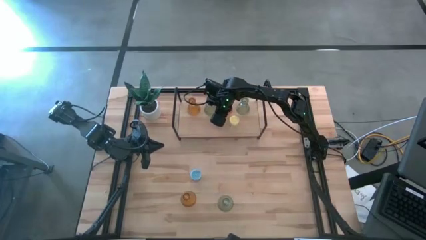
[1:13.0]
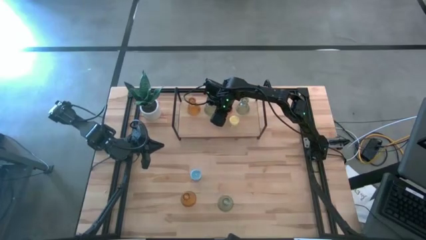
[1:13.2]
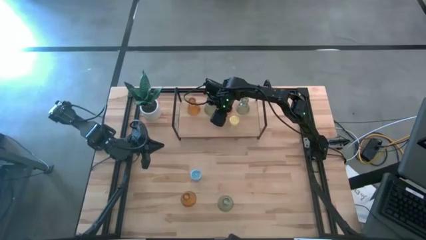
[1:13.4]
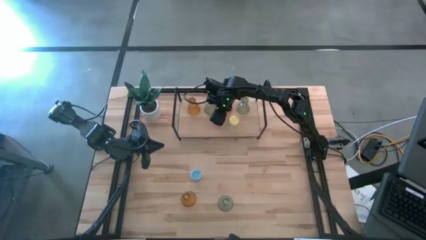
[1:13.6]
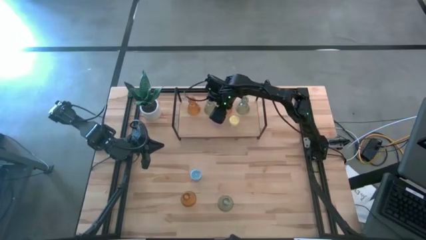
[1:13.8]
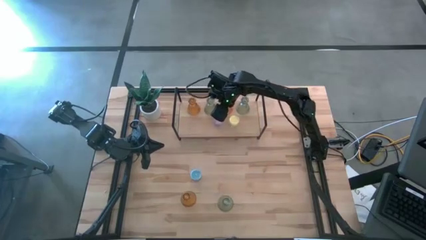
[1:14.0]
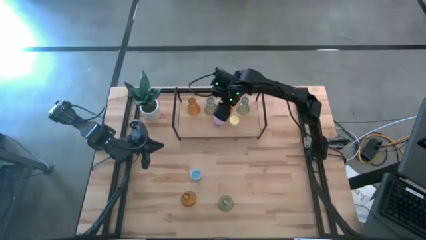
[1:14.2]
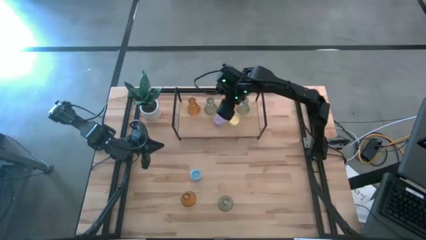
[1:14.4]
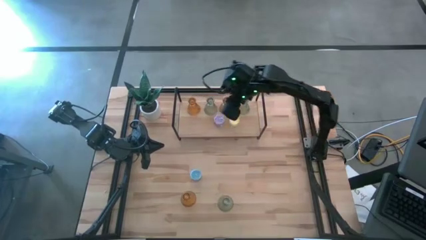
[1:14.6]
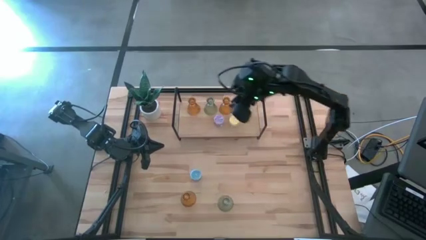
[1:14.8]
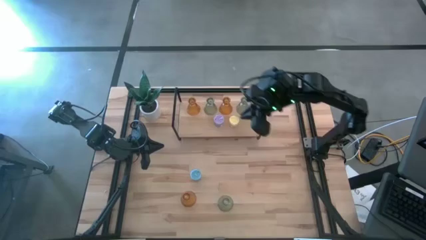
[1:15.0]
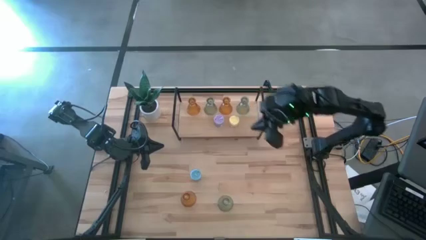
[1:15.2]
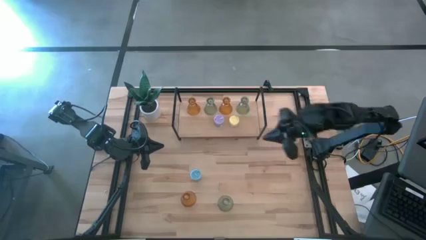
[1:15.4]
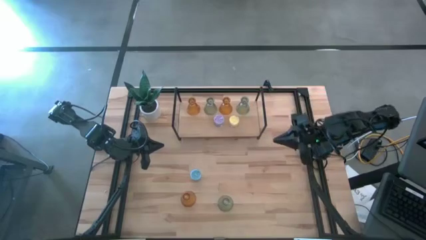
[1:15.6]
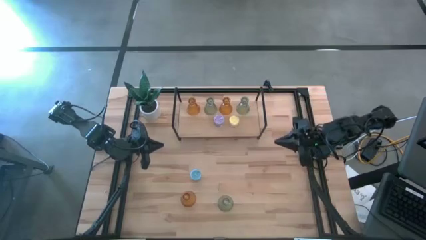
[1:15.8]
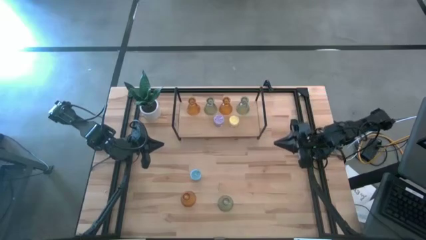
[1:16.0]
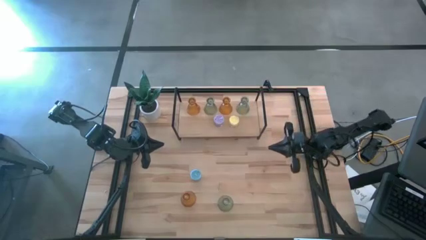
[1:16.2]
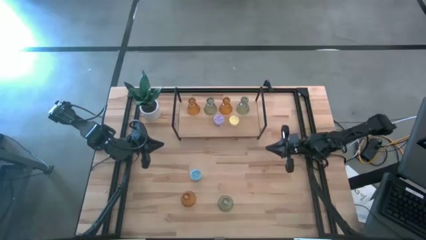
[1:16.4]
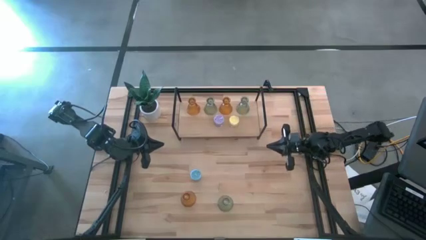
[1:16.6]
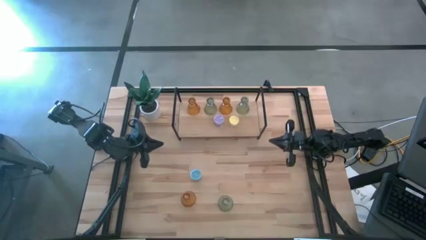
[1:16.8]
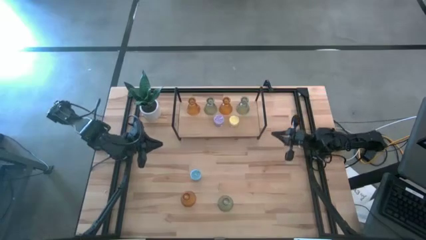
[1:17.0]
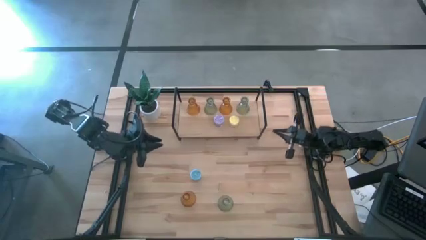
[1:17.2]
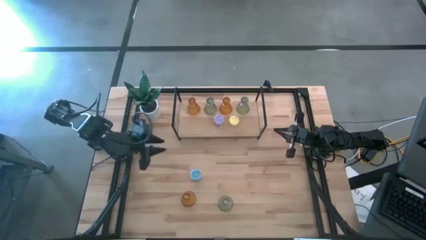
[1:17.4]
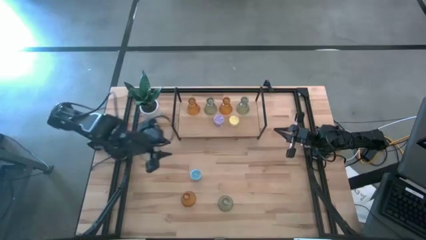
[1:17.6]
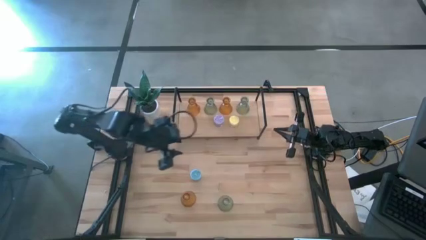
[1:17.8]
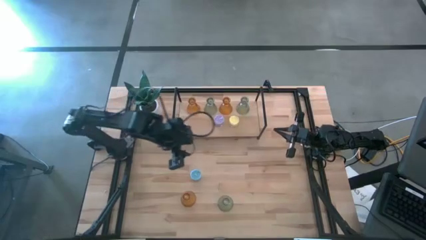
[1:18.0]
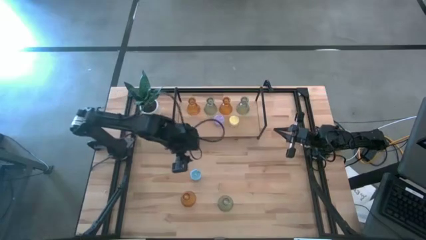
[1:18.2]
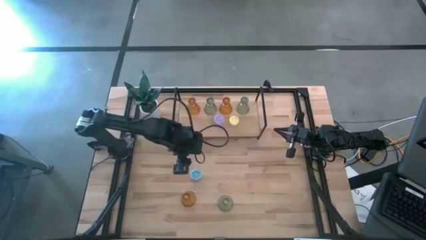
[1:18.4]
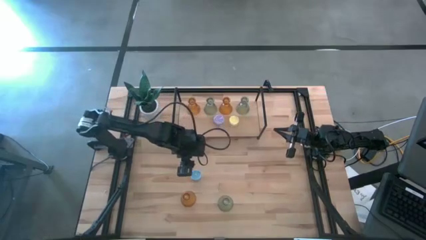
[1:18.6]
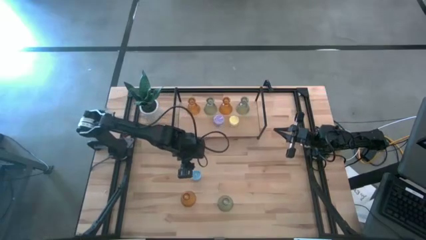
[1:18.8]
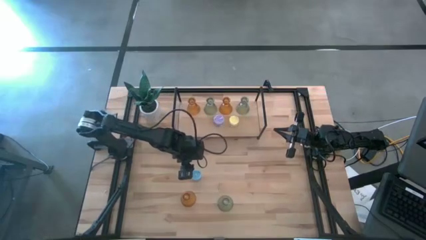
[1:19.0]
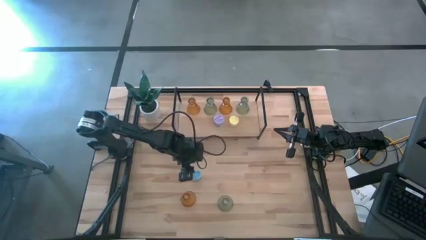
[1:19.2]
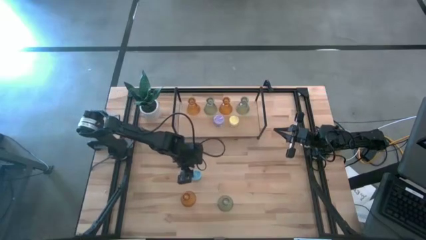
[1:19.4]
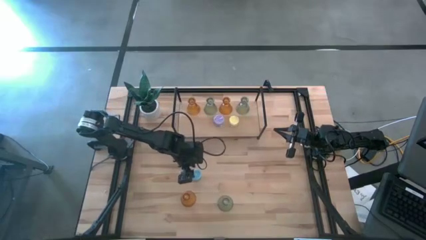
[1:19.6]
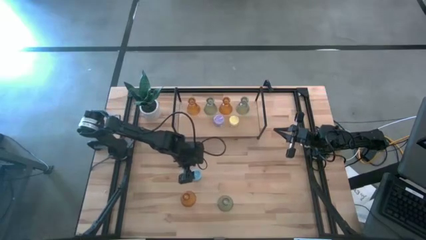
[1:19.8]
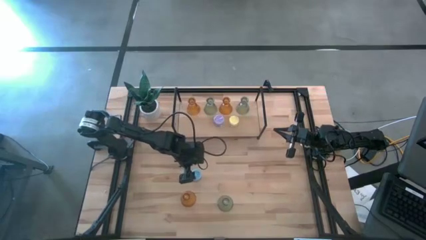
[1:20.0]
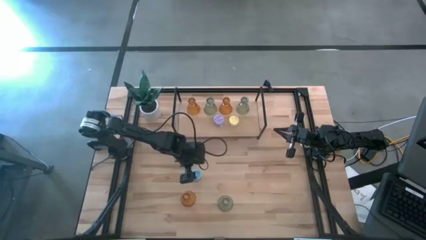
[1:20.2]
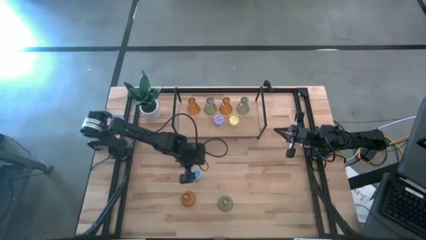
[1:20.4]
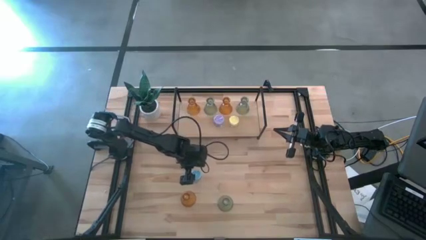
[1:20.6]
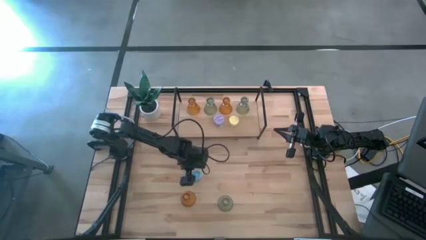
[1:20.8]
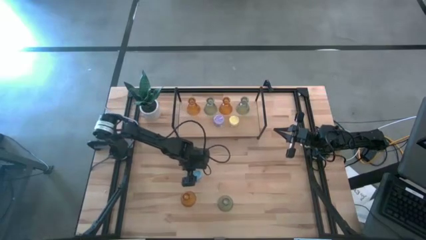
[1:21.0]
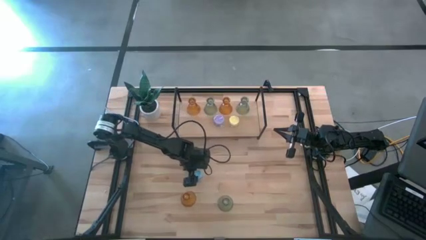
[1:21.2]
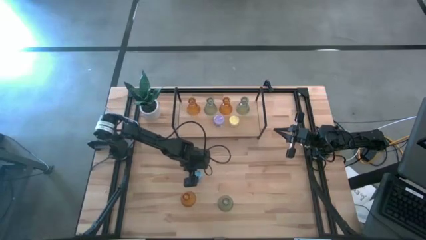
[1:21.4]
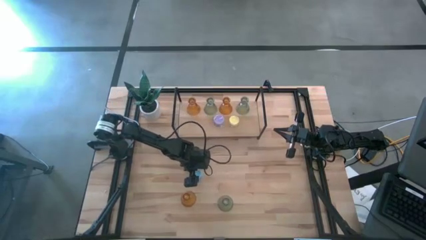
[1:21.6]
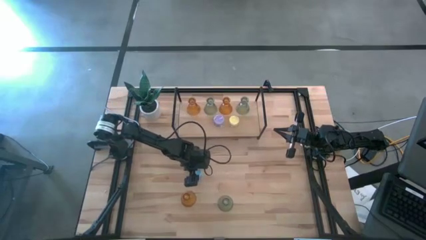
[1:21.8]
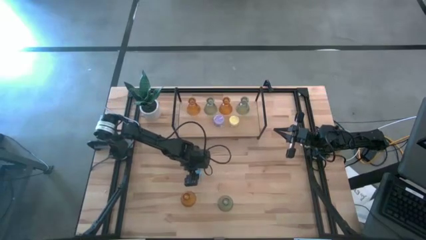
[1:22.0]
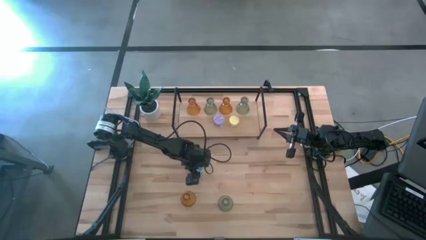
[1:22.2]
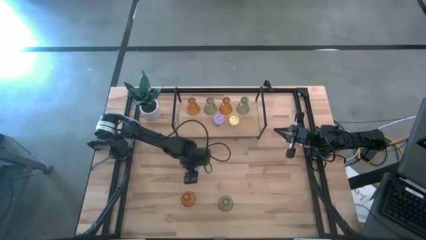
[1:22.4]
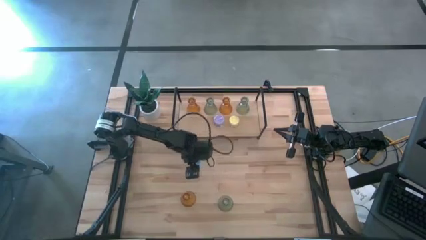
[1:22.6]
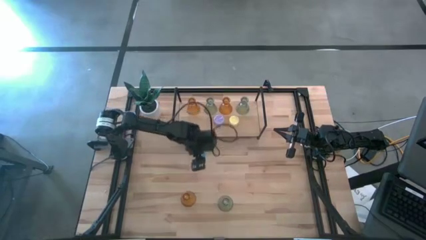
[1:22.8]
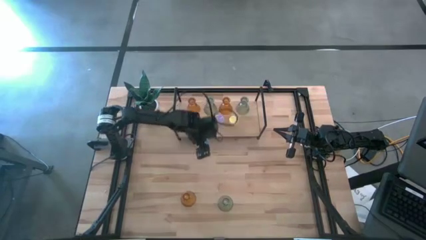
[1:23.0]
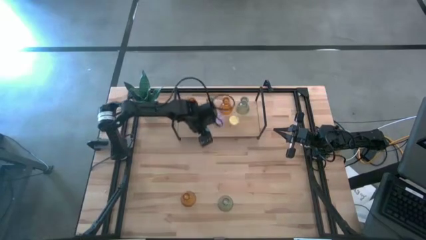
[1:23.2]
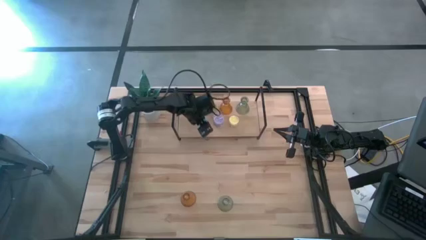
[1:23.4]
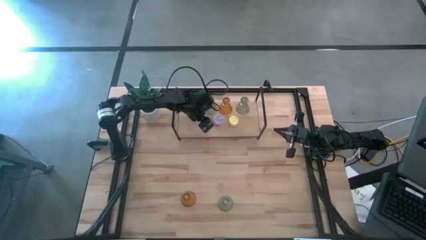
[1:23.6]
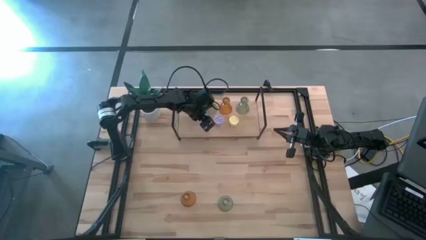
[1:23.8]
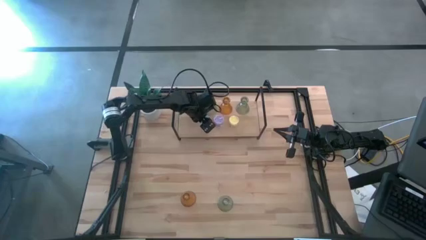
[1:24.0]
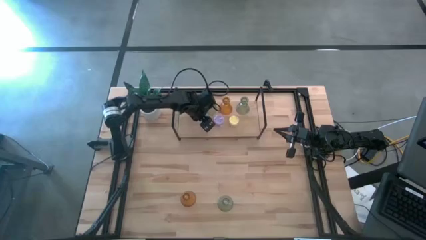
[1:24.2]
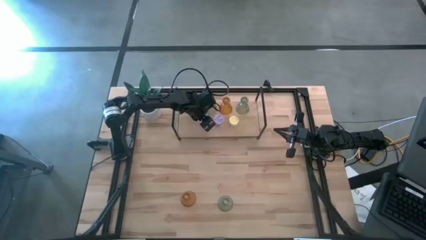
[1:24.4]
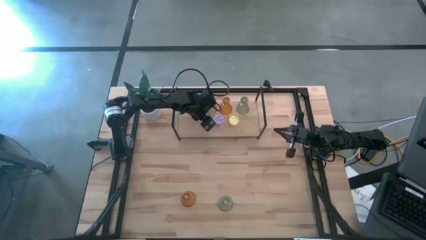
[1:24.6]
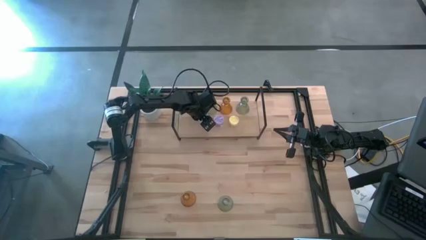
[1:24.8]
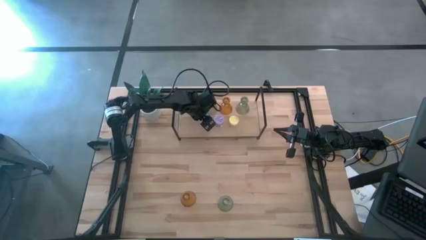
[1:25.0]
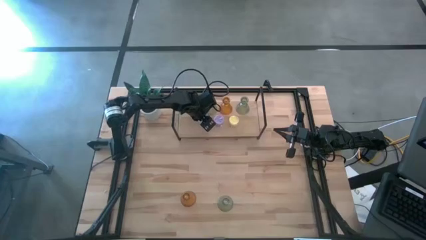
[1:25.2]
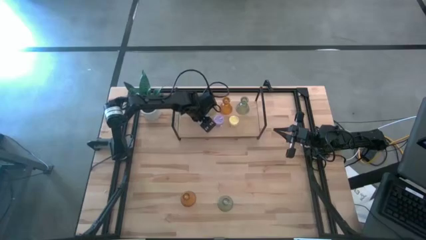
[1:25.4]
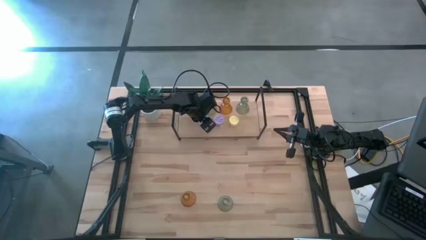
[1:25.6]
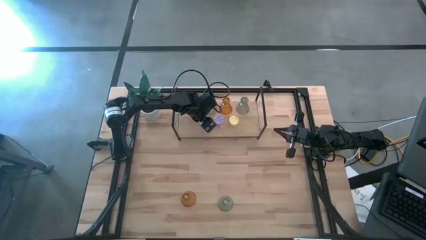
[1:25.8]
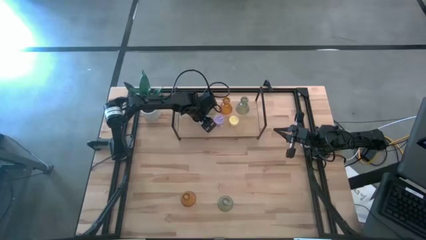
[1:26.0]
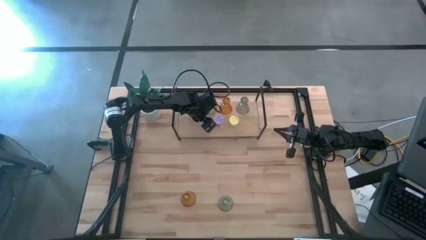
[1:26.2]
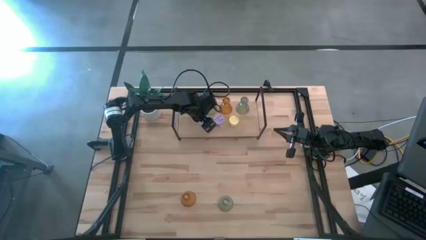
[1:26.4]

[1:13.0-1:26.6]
Task: Pick & Place candle stick holders
Put the blue candle on the shelf

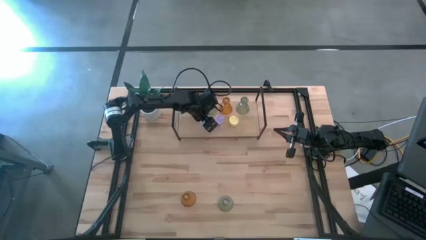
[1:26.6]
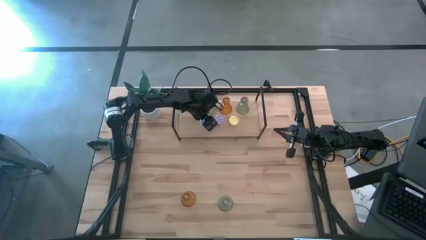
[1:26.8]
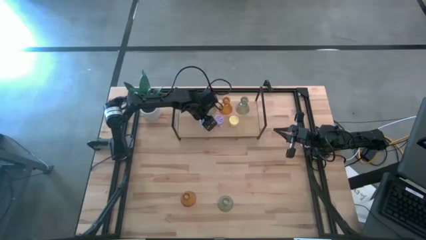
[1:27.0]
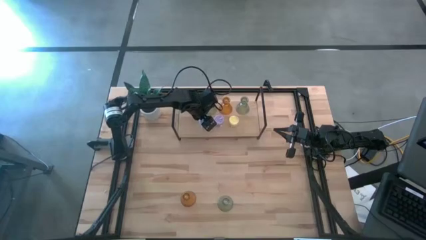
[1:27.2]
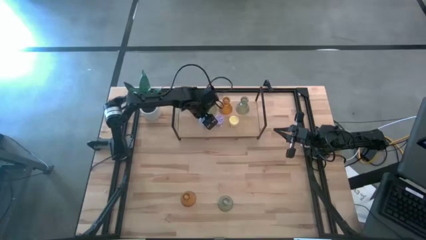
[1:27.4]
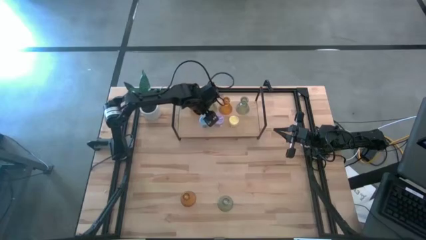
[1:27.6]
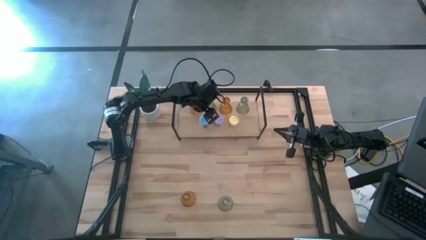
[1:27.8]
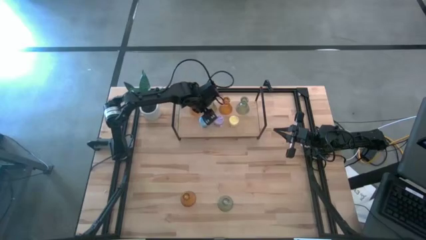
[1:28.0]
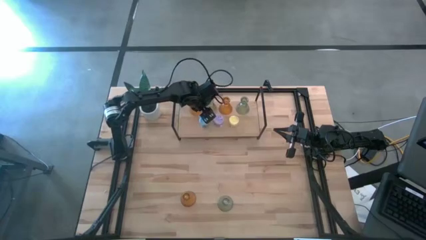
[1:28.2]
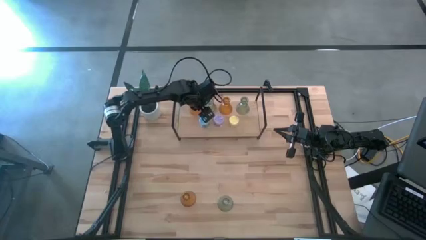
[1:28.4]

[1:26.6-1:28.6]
Adjust the yellow candle on the shelf
